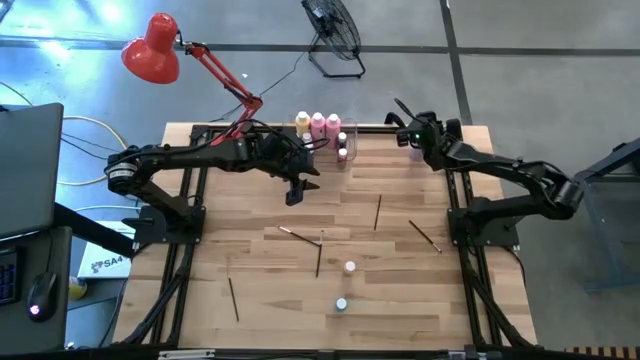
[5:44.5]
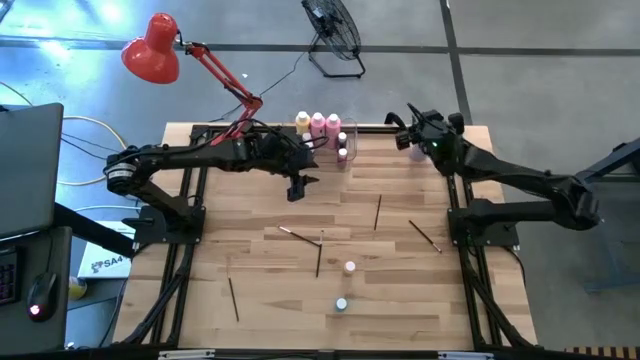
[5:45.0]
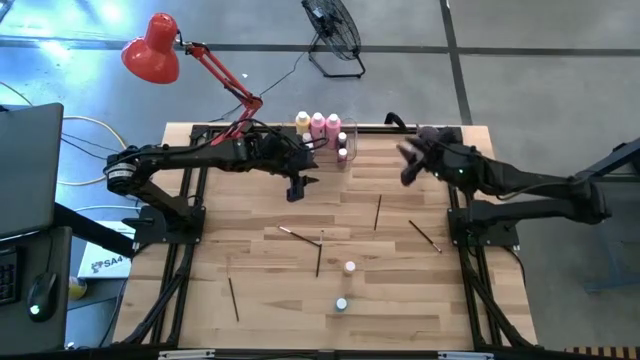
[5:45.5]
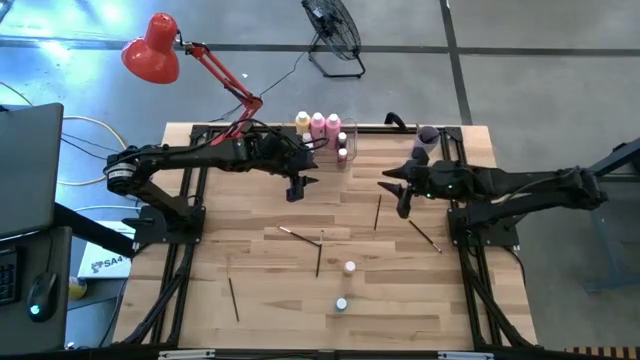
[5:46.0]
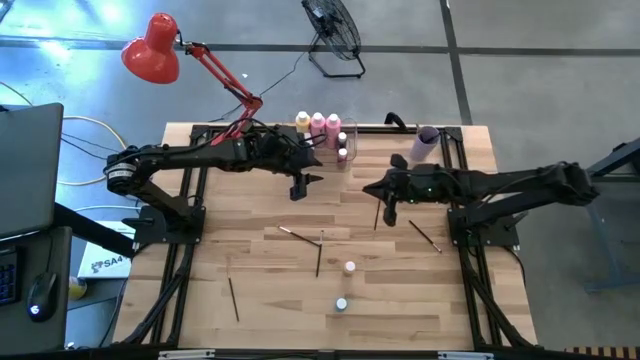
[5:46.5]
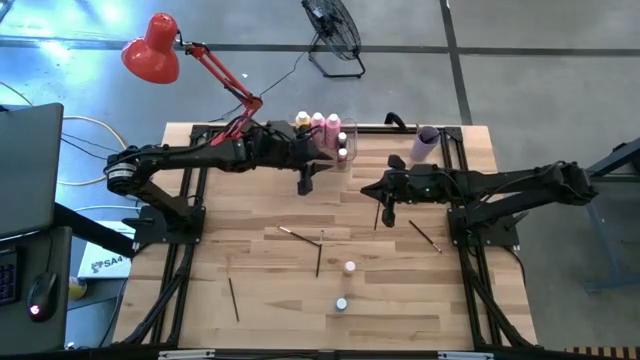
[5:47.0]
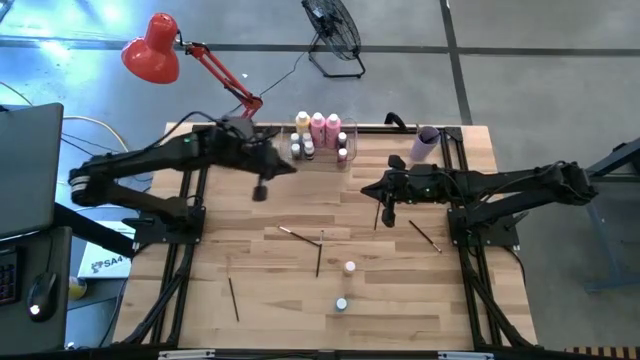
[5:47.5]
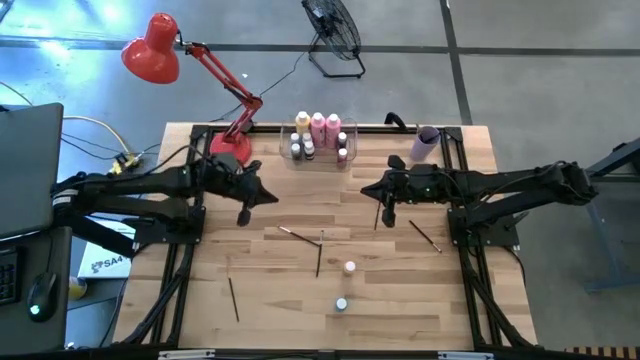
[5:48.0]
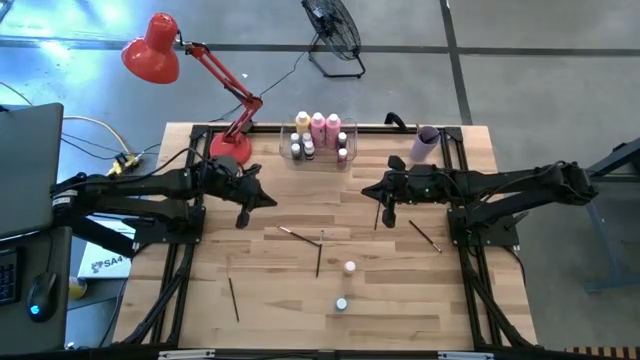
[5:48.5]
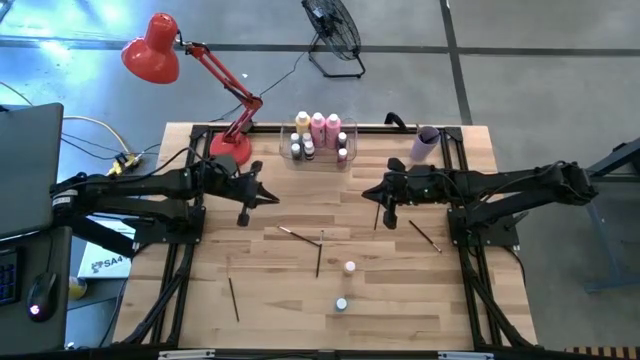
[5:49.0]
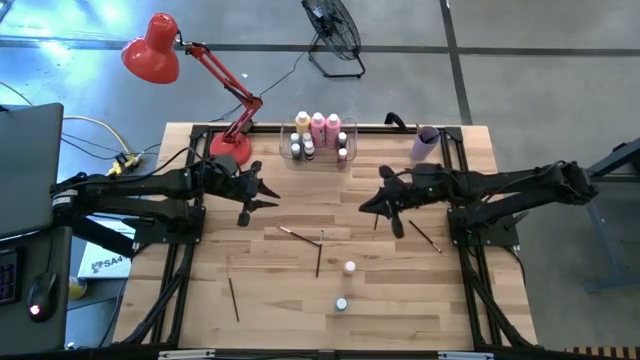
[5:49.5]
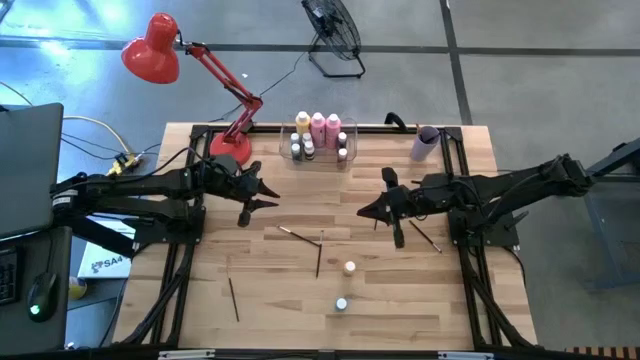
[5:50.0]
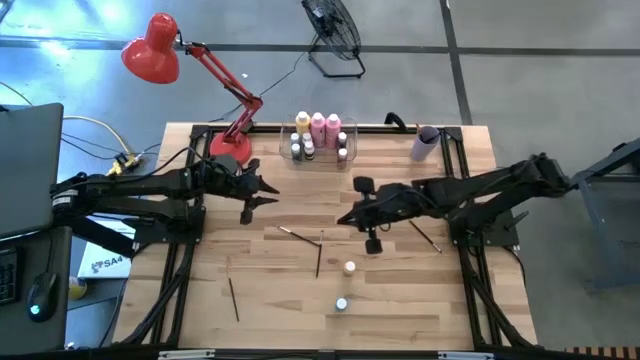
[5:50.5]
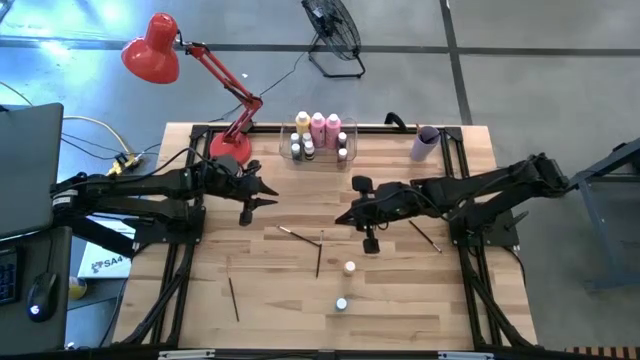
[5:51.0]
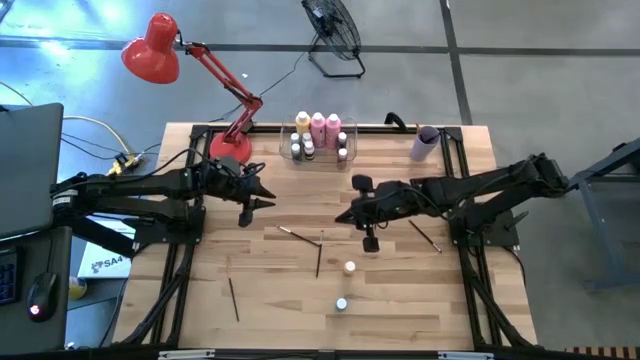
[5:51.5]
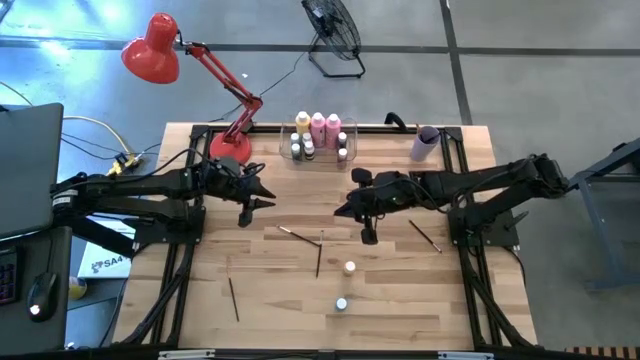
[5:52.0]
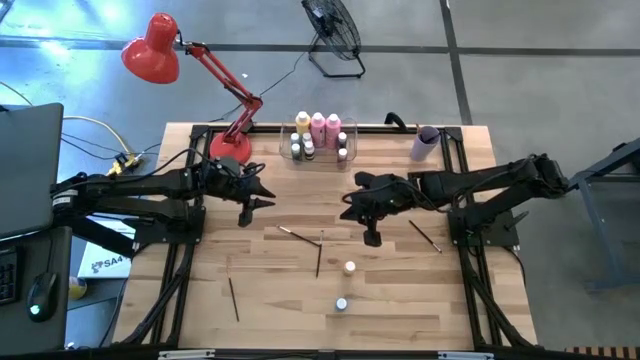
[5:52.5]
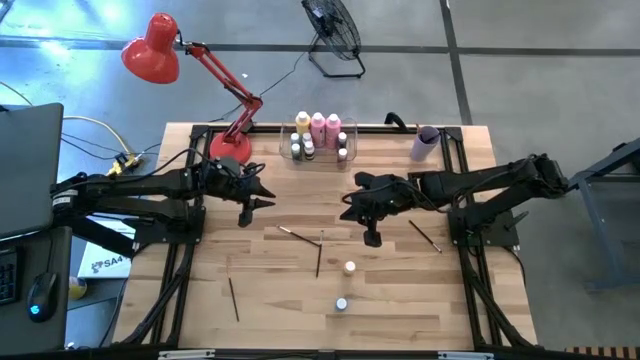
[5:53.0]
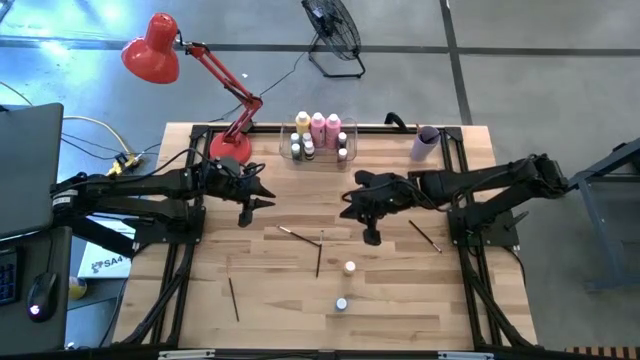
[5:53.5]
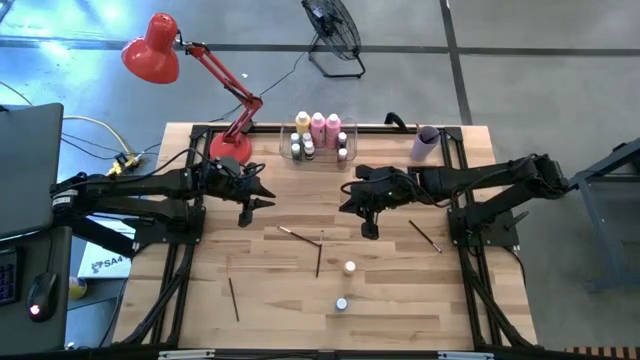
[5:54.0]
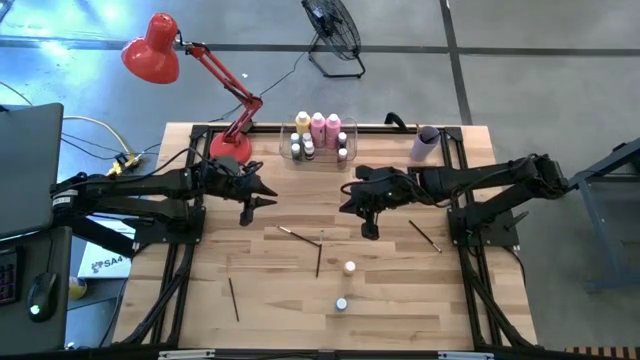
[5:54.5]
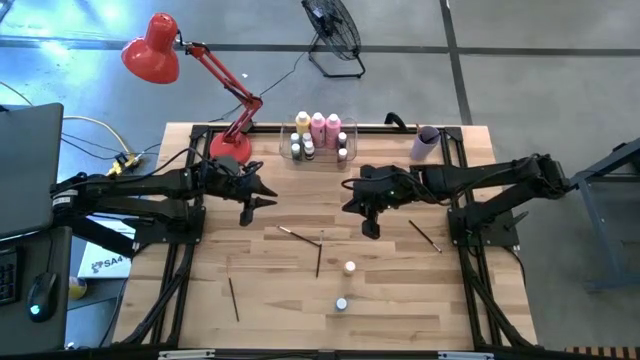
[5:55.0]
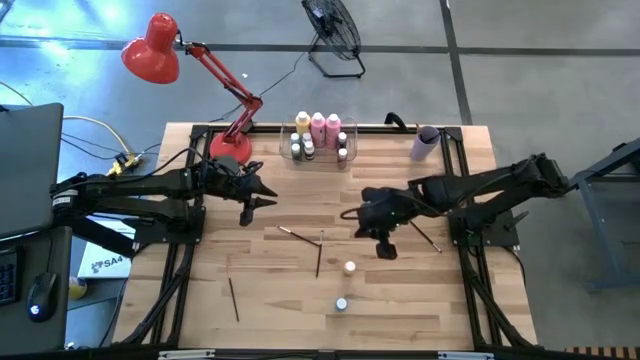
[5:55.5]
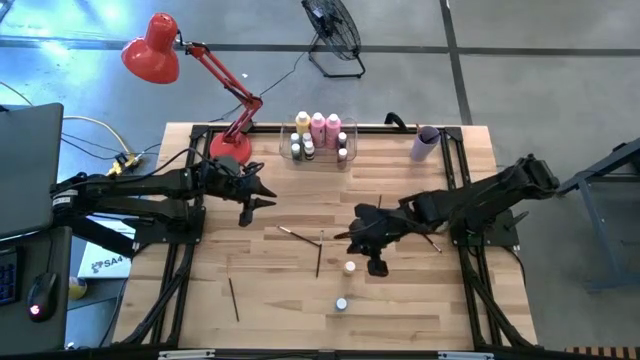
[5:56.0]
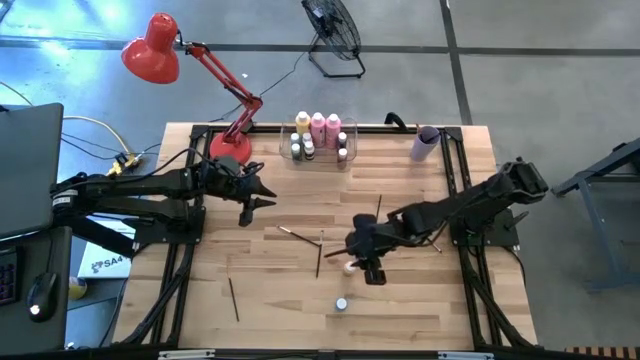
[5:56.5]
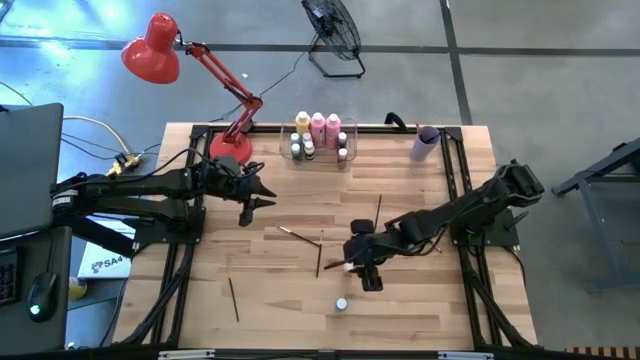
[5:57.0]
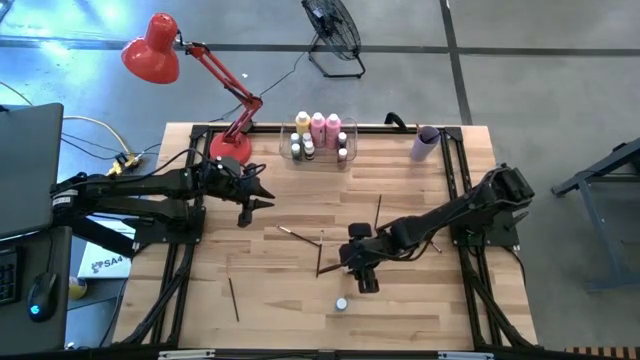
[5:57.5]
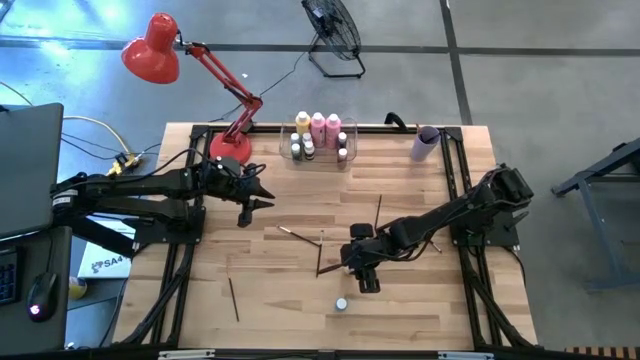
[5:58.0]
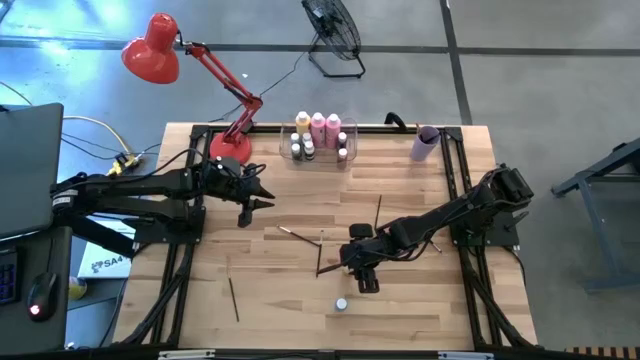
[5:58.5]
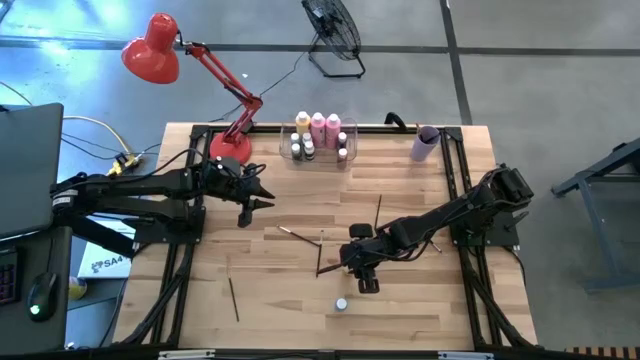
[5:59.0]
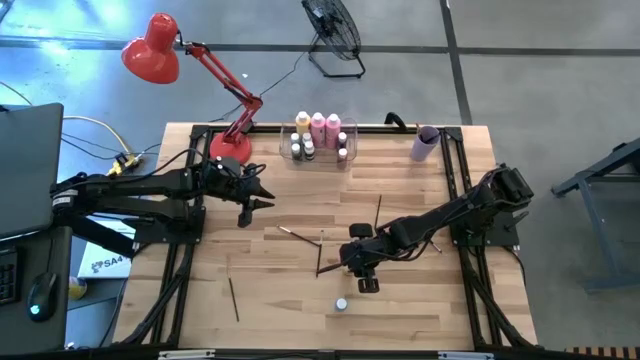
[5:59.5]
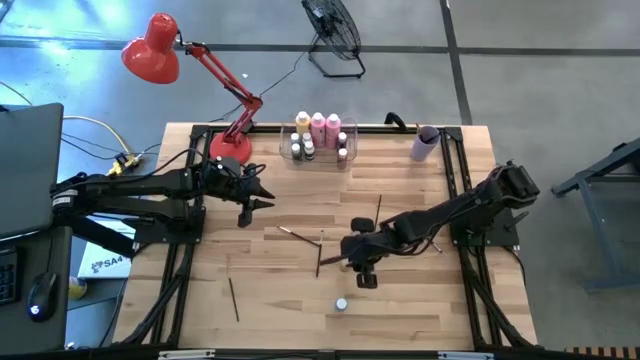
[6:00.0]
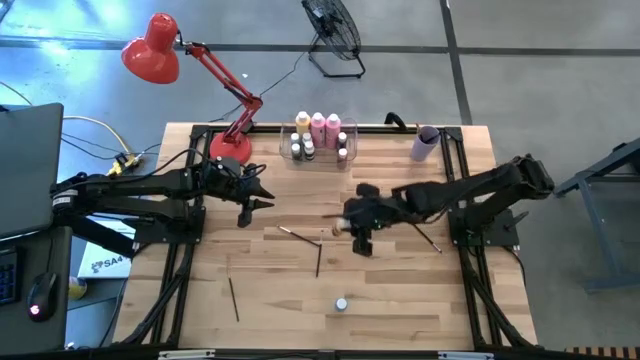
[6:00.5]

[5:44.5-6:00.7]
Task: Pick & Place Paint Supplies
Put the small yellow paint bottle into the transparent bin

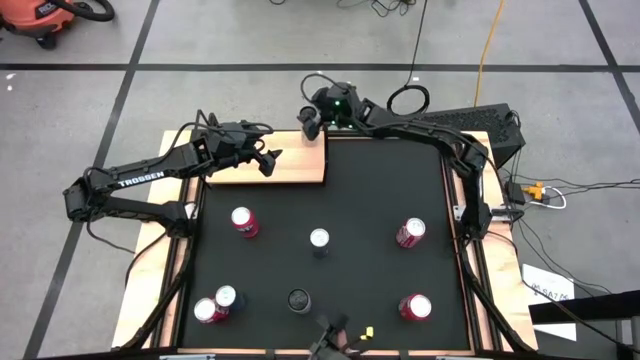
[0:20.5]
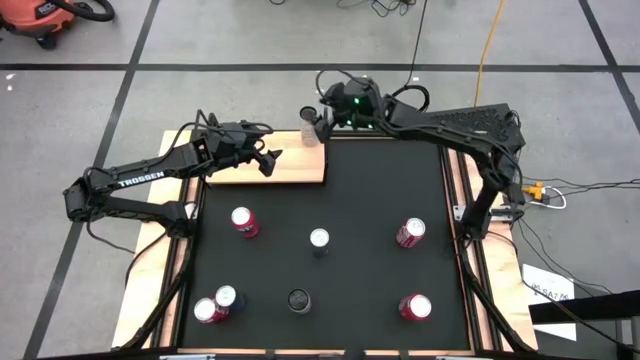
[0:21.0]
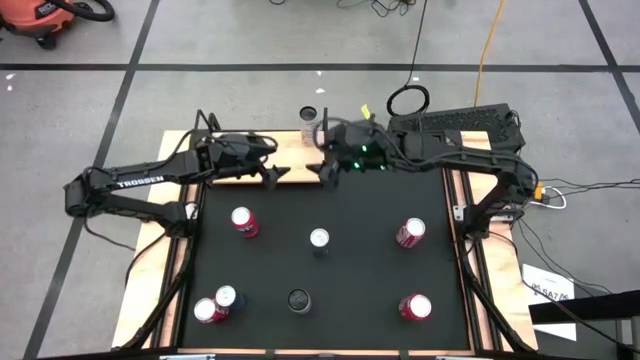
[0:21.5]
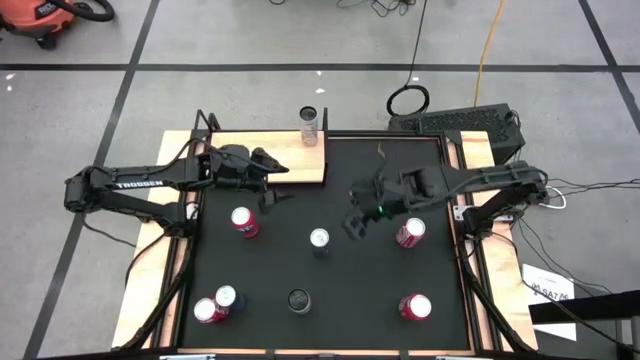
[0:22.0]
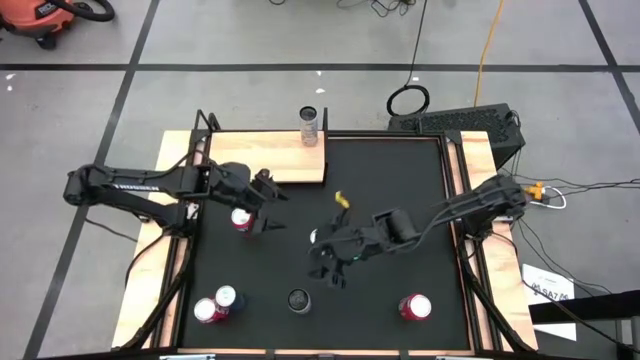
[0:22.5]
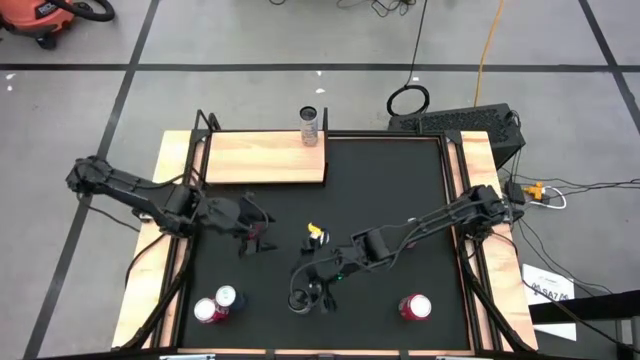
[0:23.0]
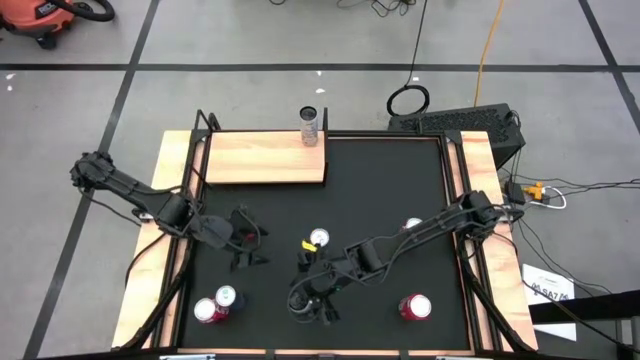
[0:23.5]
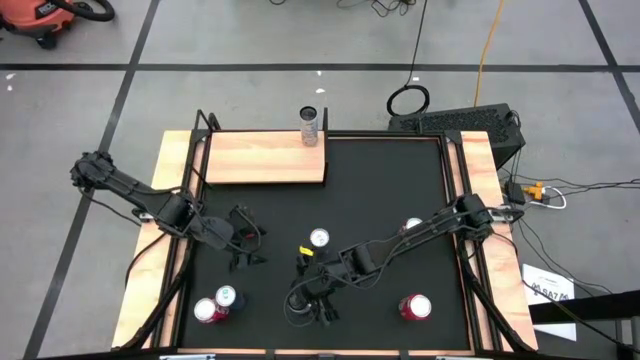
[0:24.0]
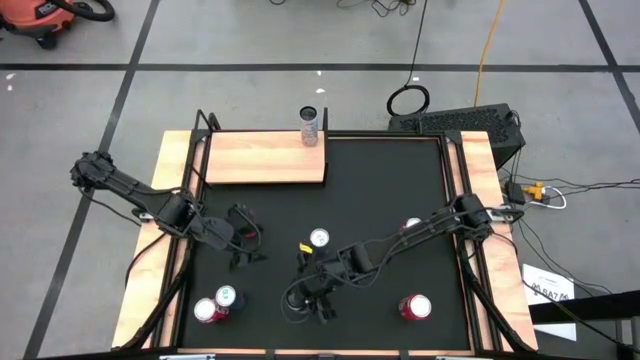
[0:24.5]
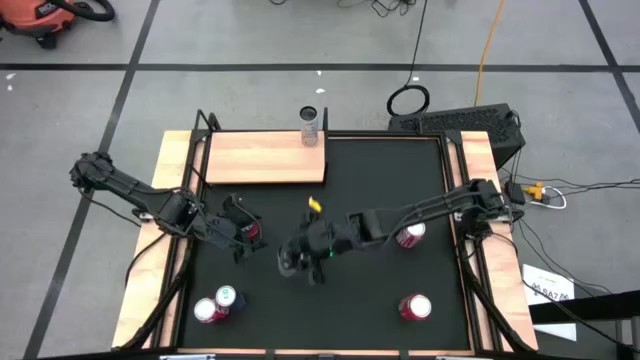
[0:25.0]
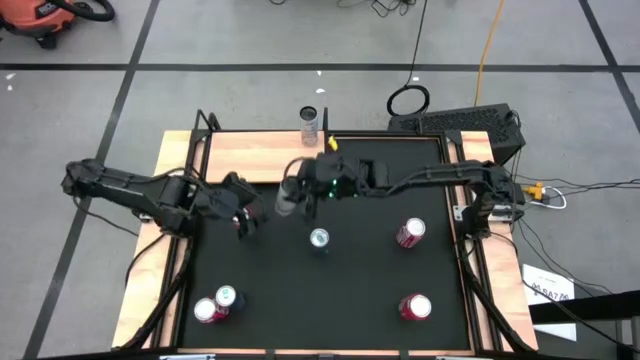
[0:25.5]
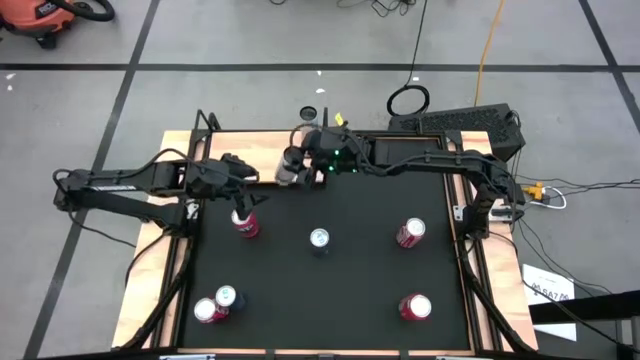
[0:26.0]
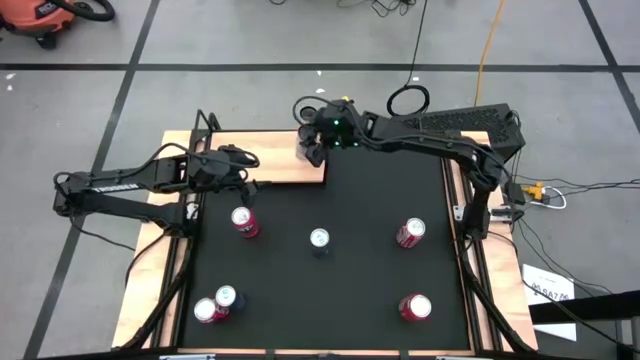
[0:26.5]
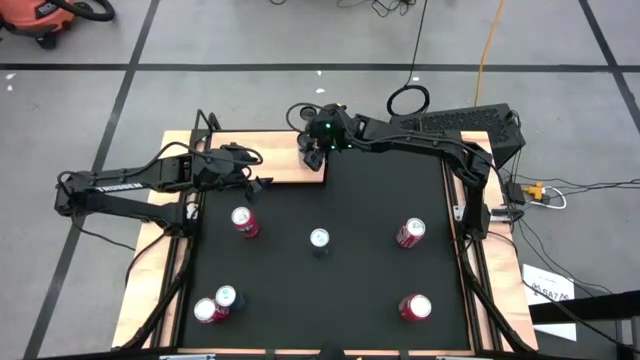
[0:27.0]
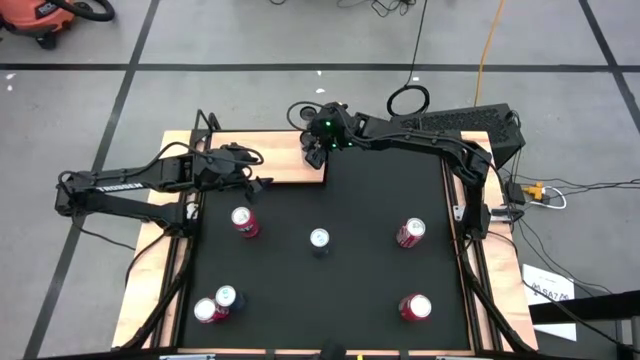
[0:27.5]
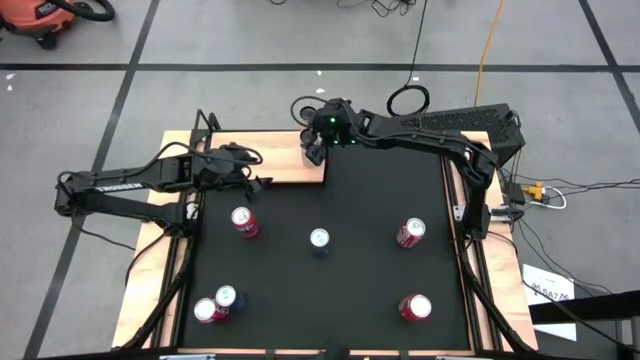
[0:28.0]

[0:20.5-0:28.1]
Task: Place canned beverage on shelf
Put the white-yellow soda can aligned with the other white-yellow soda can on the shelf
